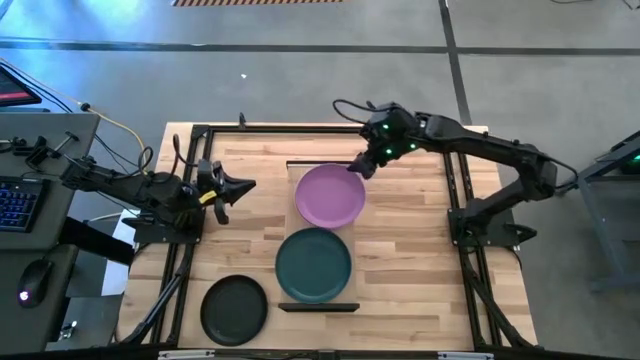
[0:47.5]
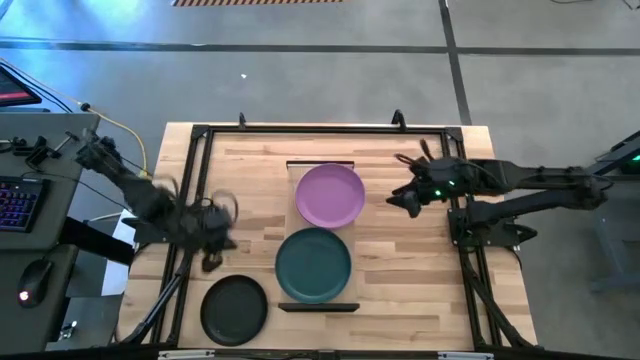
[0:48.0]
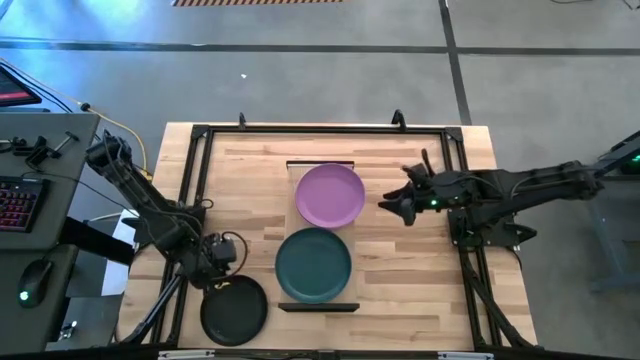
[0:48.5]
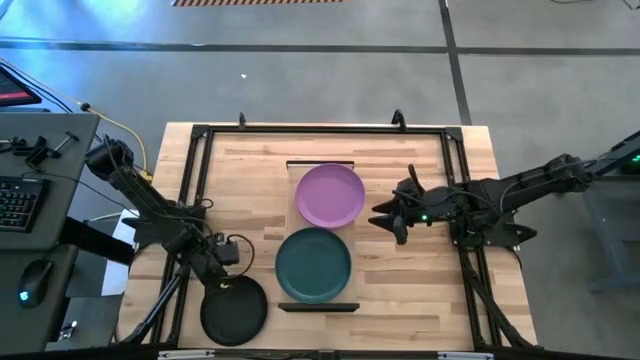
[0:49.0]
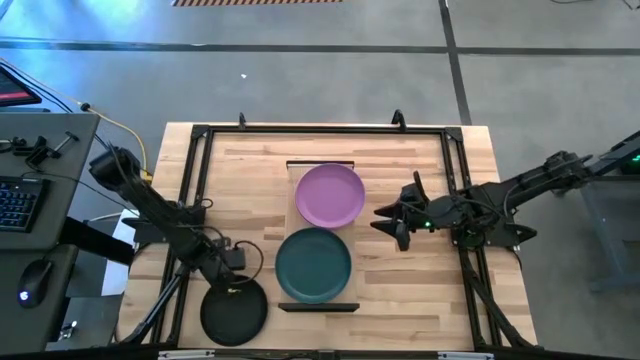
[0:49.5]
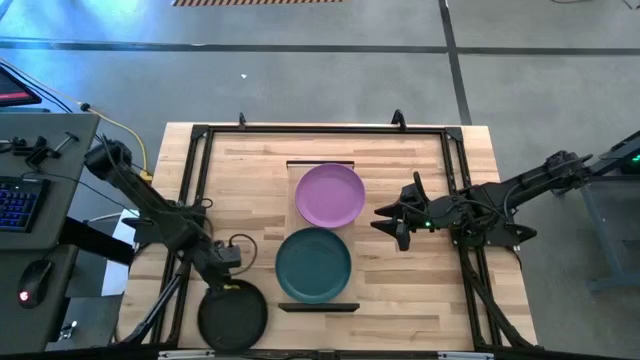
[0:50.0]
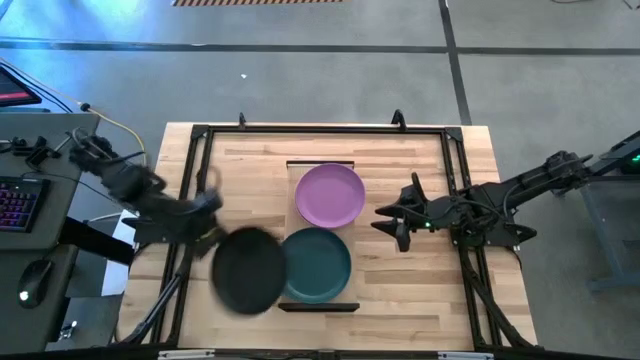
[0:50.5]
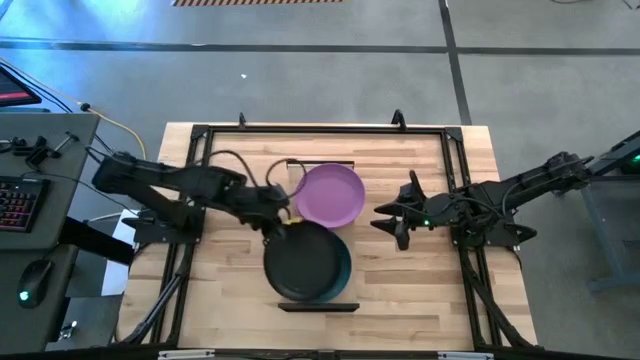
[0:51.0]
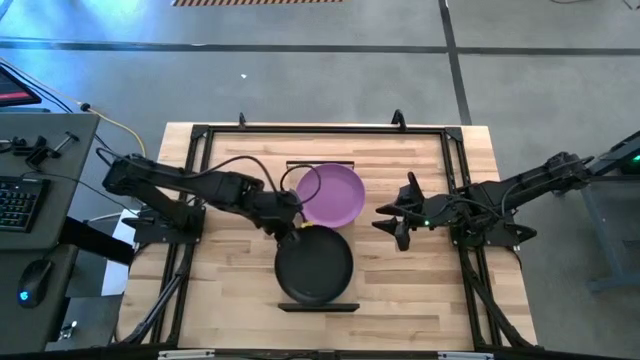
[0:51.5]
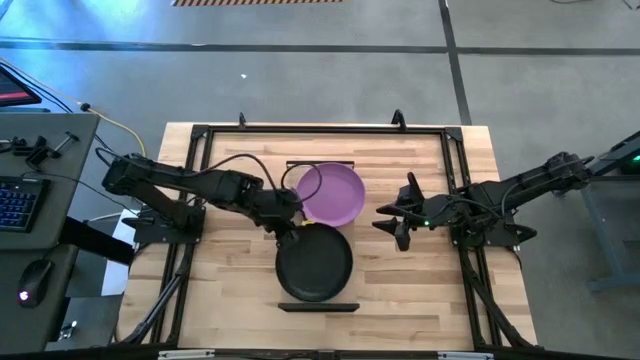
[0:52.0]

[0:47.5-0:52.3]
Task: Place and stack plates onto a shelf
Stack the black plate on top of the dark blue plate on the shelf

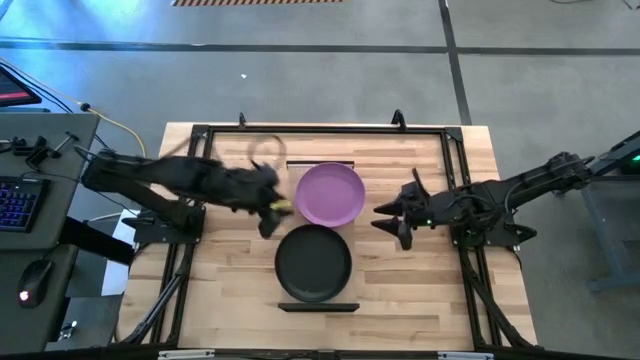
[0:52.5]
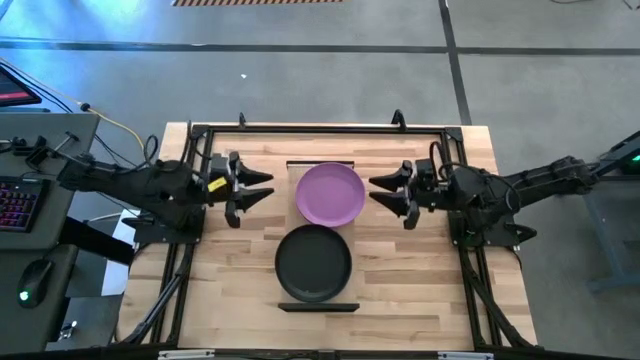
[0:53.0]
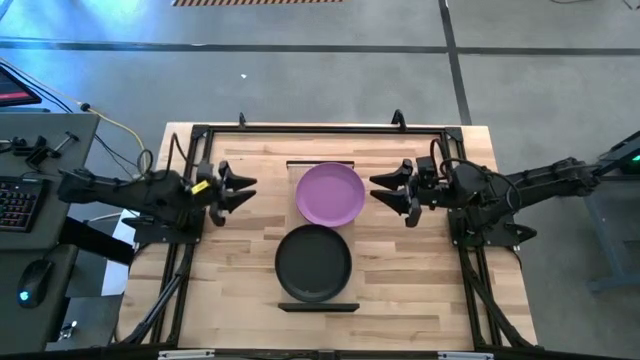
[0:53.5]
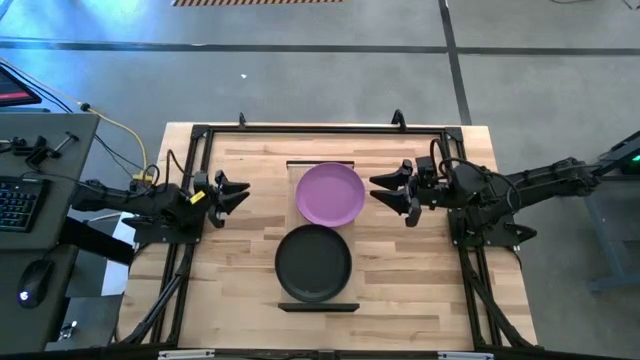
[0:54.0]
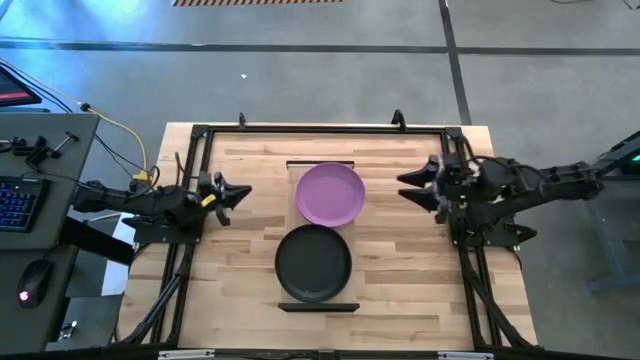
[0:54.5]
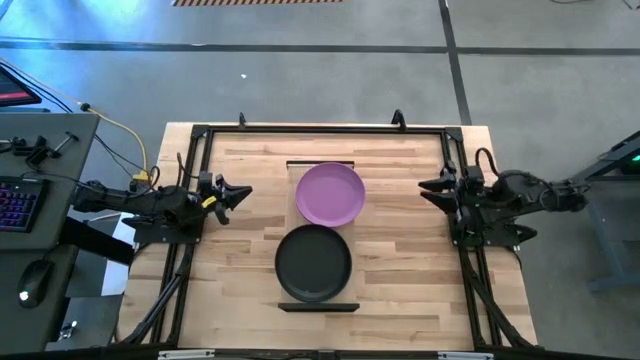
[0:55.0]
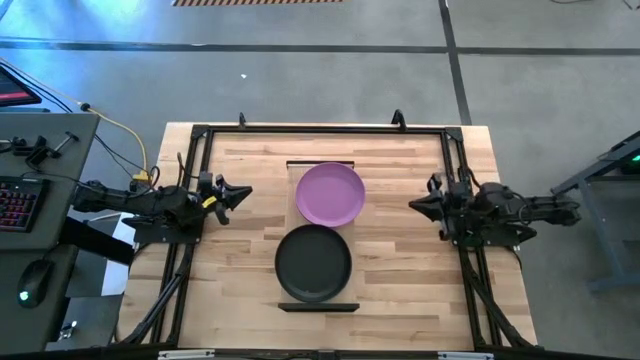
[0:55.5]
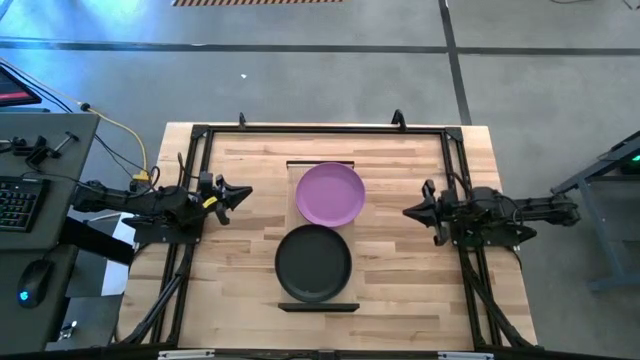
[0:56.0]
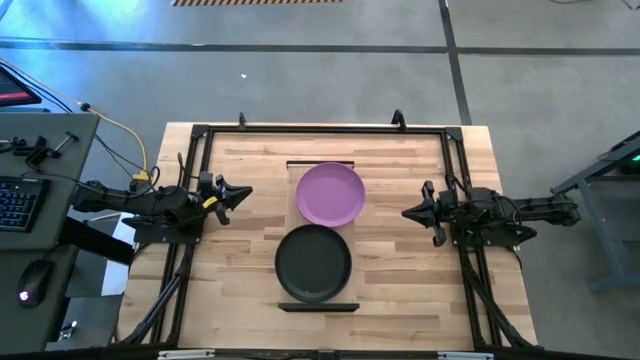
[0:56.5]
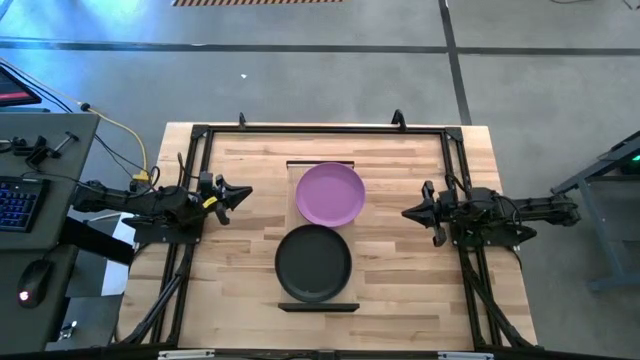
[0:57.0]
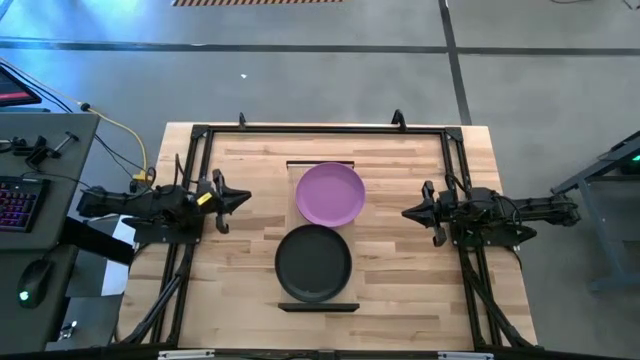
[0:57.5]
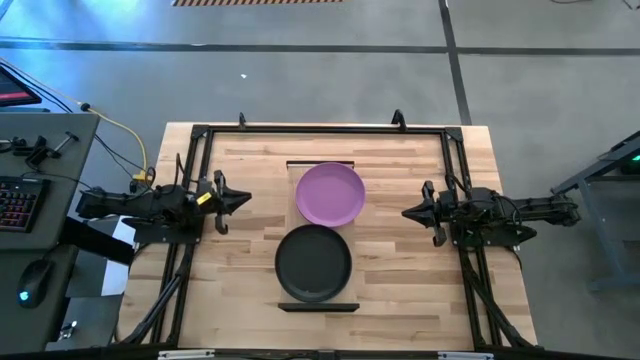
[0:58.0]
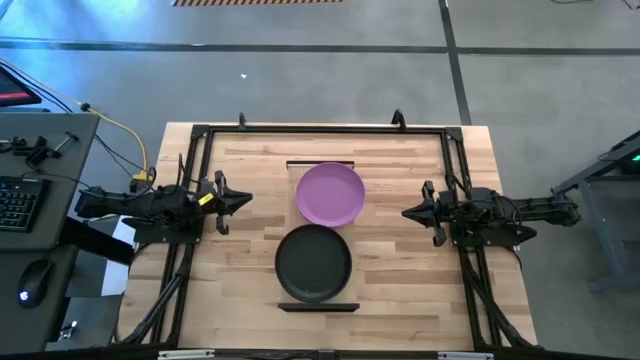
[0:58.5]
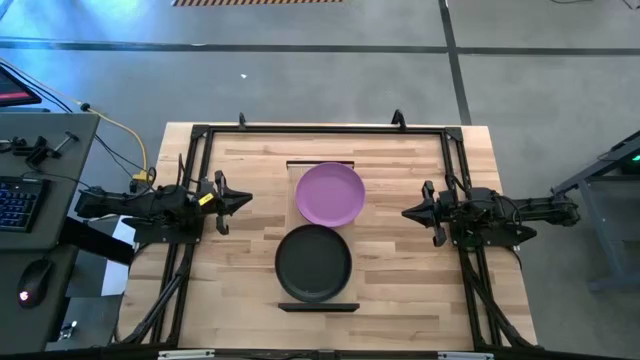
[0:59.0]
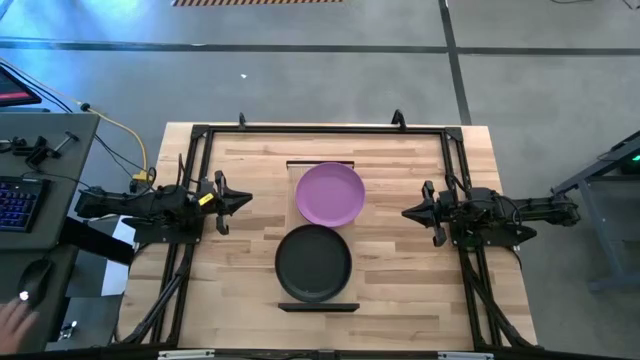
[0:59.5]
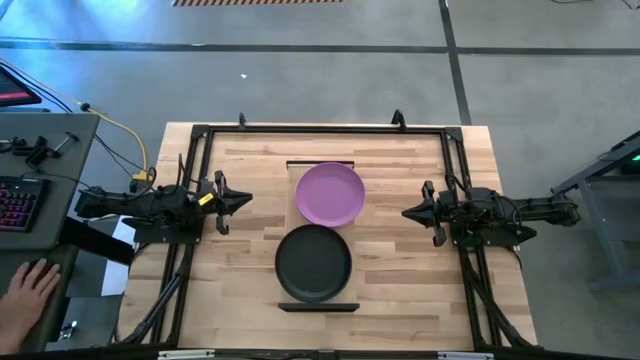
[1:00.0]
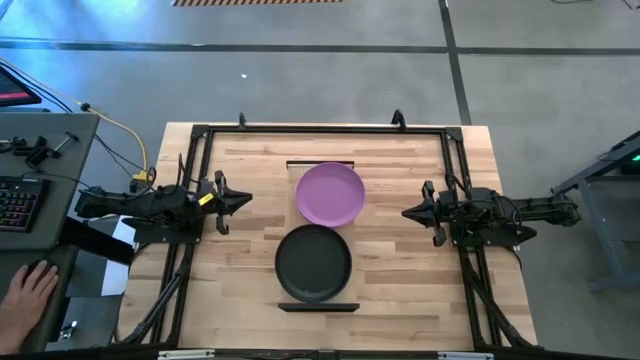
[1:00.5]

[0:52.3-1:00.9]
Return to Home Position

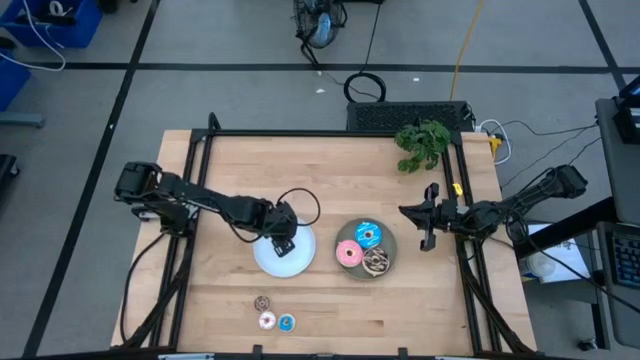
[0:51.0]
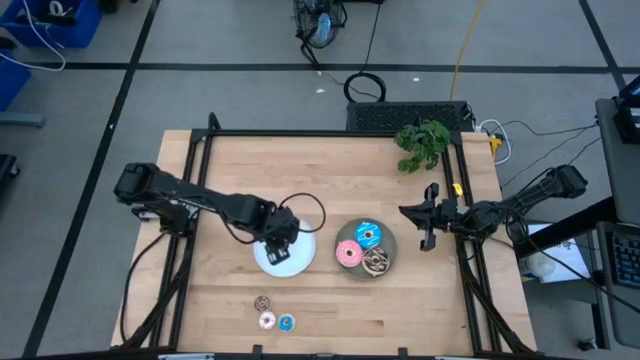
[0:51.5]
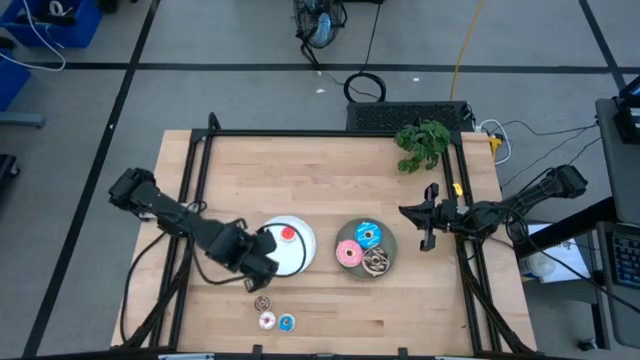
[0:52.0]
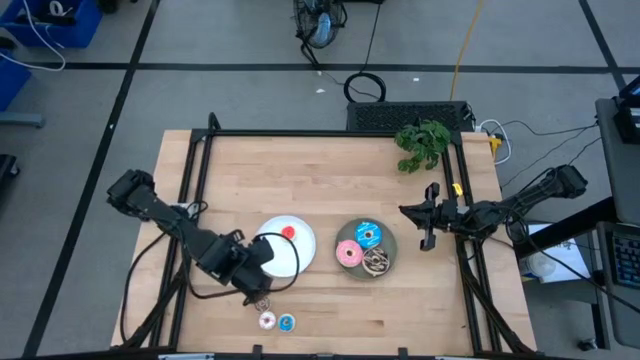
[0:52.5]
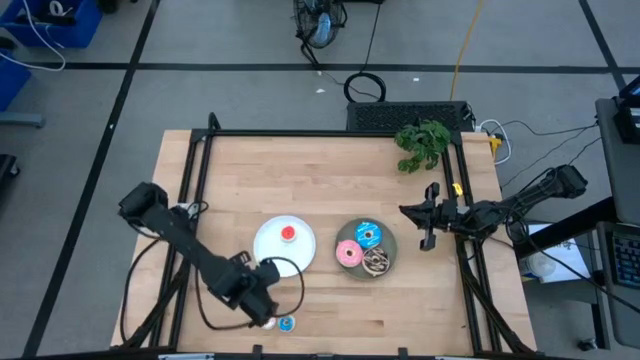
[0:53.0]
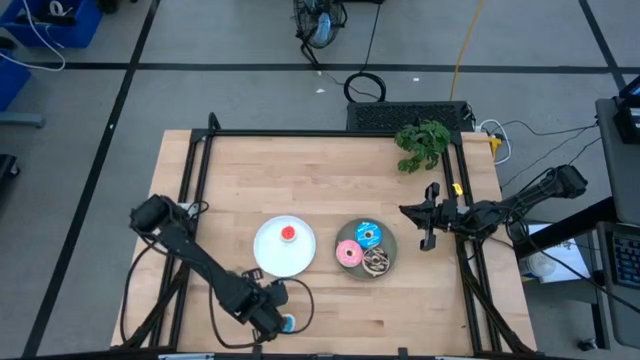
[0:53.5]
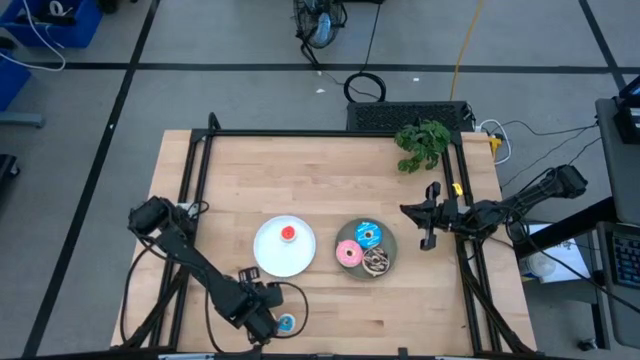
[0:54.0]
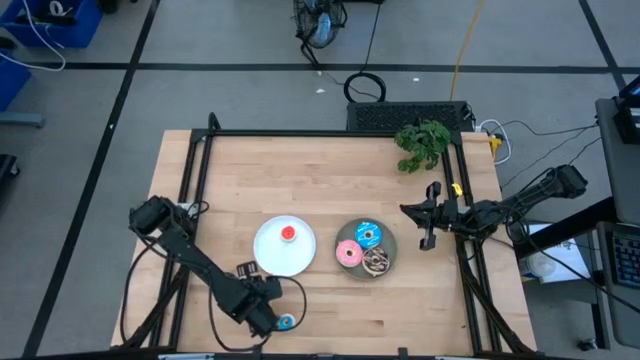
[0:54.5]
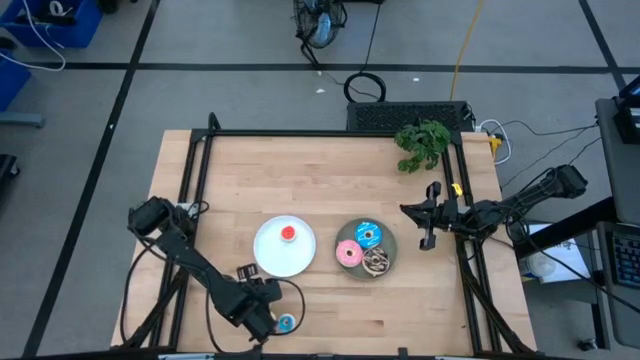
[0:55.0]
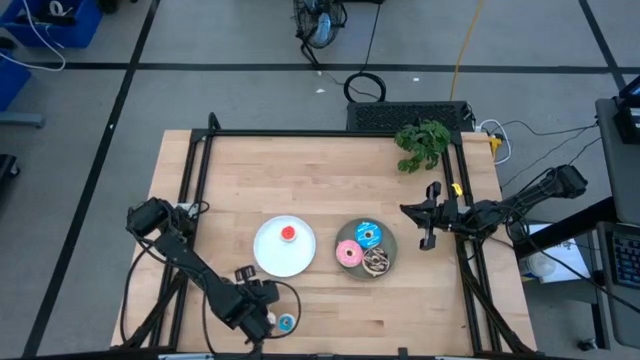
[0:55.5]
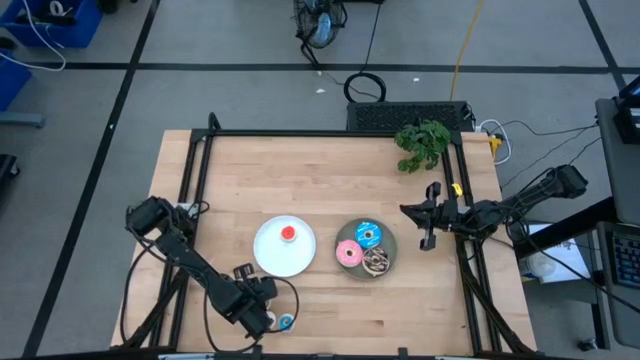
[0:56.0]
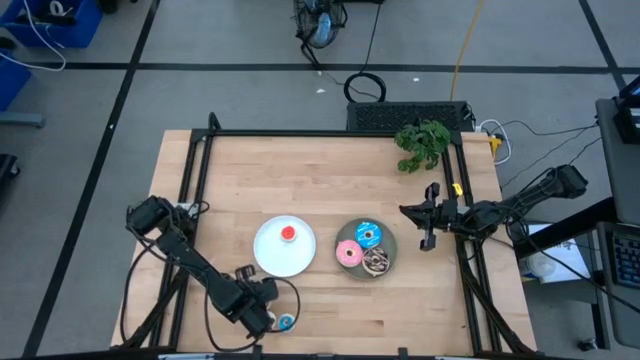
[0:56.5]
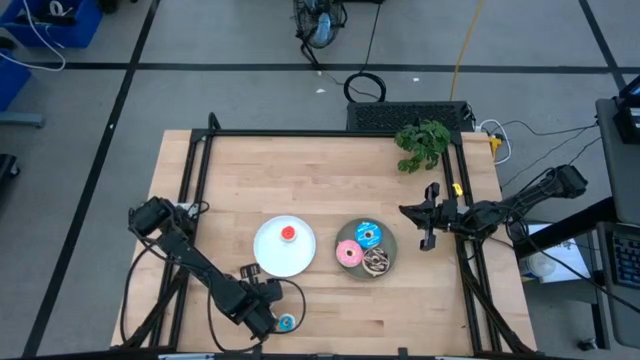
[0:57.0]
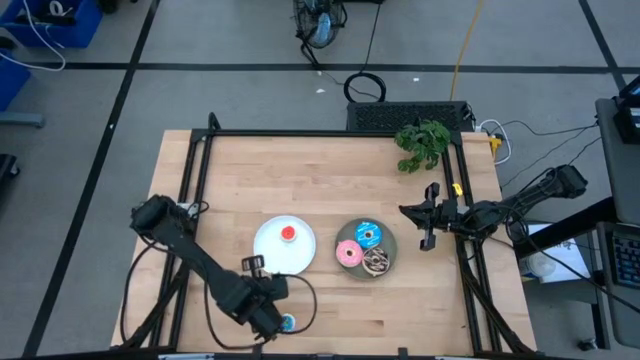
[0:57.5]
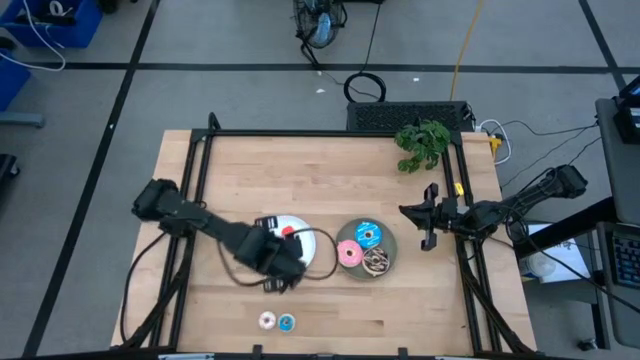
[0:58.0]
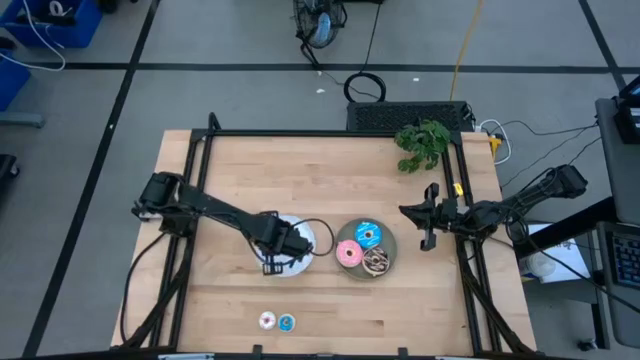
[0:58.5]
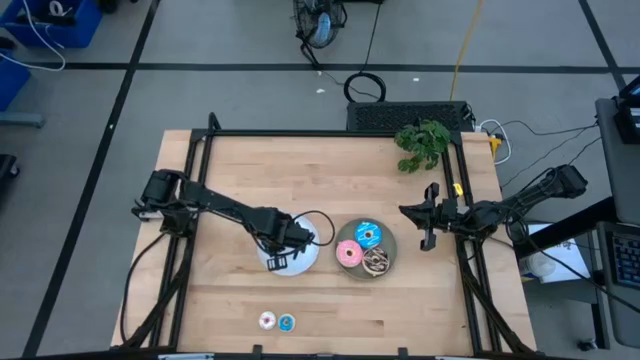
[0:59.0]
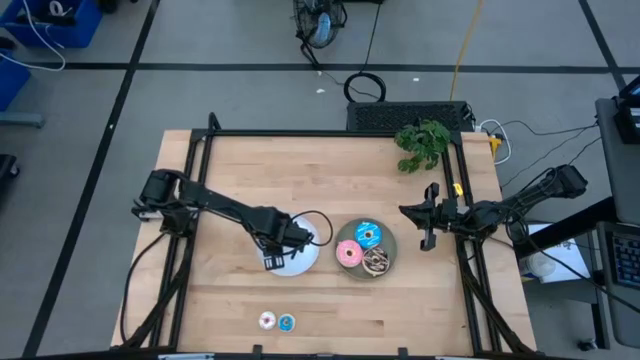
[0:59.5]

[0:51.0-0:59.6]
Task: Pick & Place donuts
Put the small brown donut on the white plate
